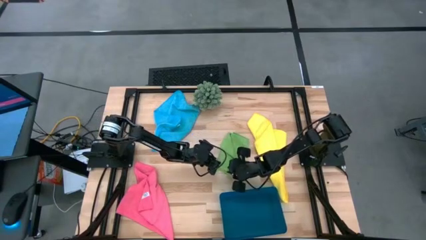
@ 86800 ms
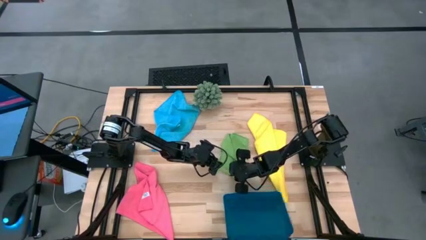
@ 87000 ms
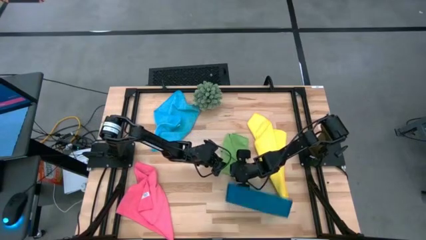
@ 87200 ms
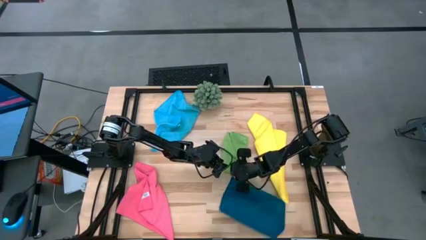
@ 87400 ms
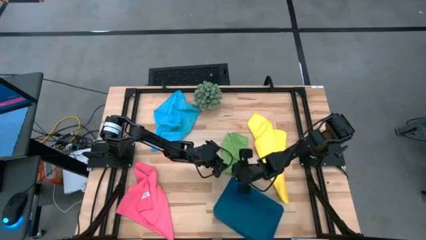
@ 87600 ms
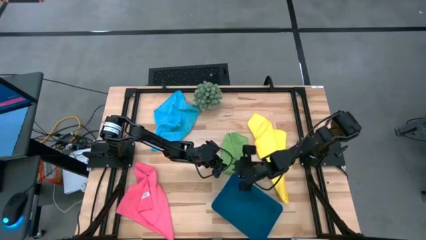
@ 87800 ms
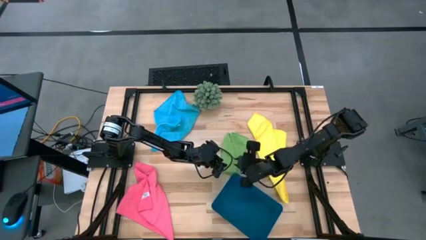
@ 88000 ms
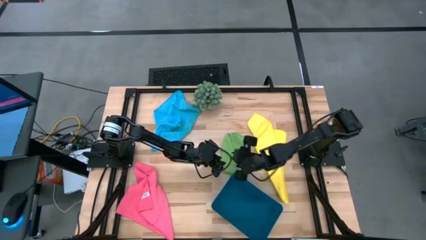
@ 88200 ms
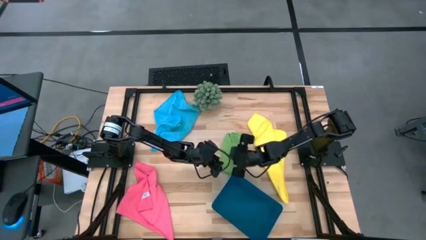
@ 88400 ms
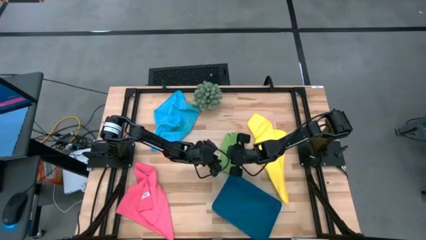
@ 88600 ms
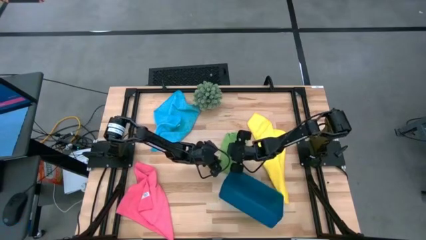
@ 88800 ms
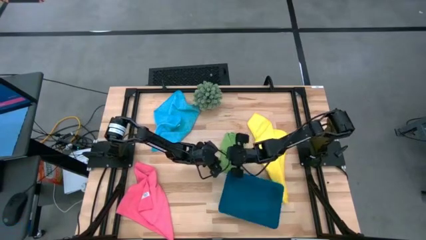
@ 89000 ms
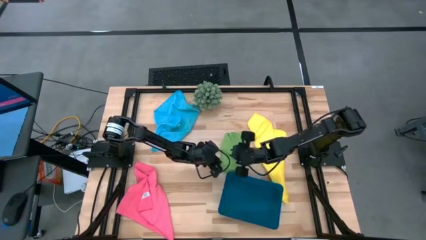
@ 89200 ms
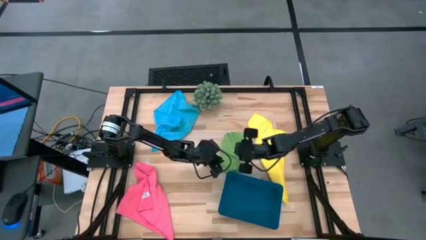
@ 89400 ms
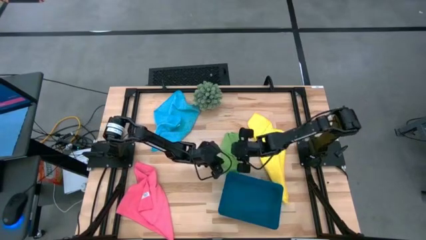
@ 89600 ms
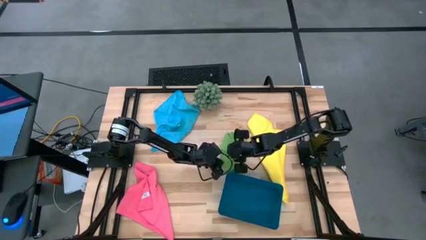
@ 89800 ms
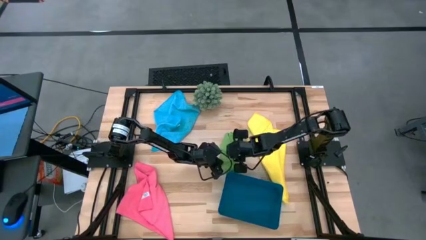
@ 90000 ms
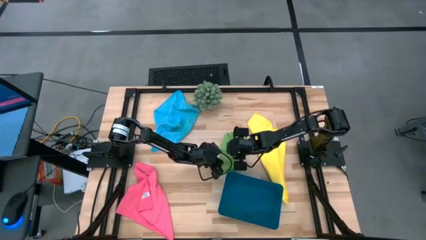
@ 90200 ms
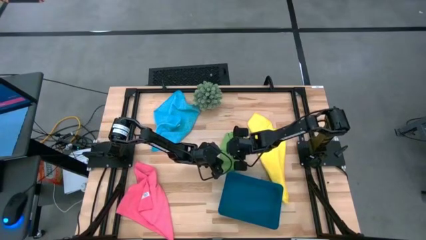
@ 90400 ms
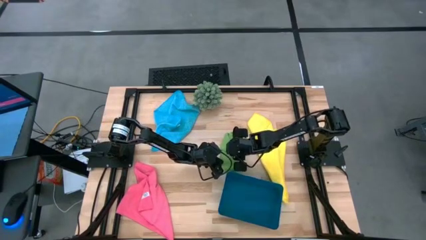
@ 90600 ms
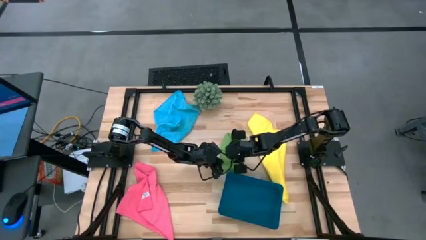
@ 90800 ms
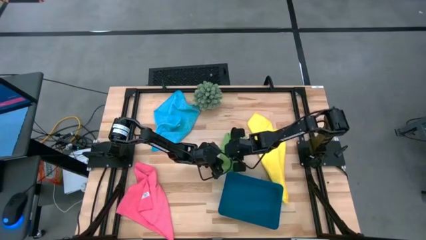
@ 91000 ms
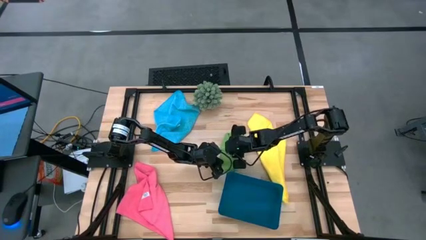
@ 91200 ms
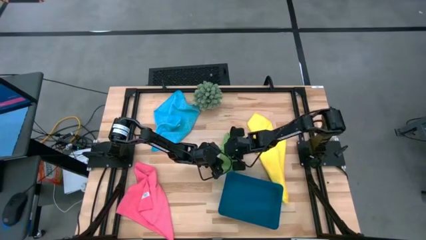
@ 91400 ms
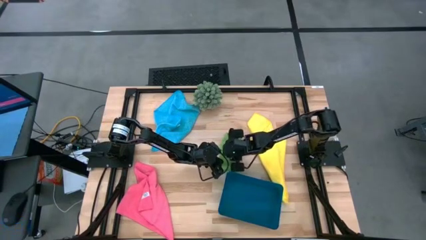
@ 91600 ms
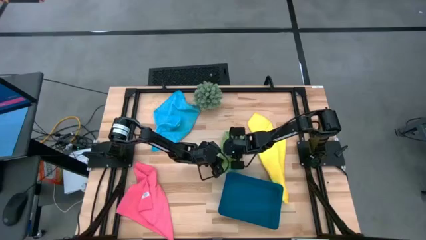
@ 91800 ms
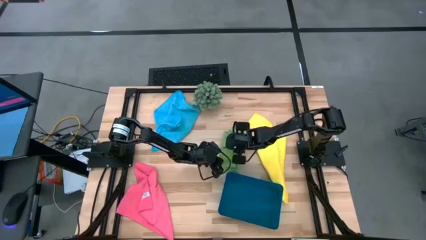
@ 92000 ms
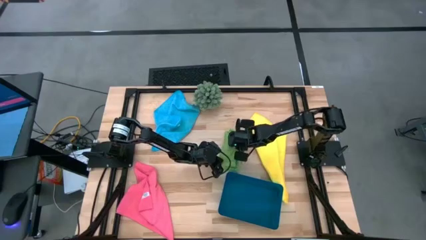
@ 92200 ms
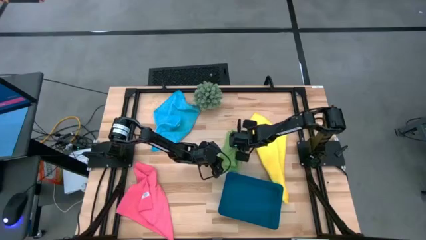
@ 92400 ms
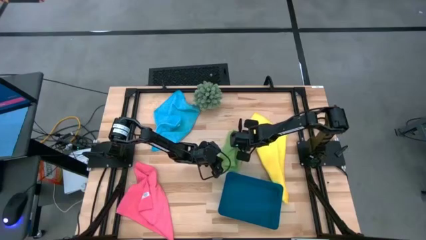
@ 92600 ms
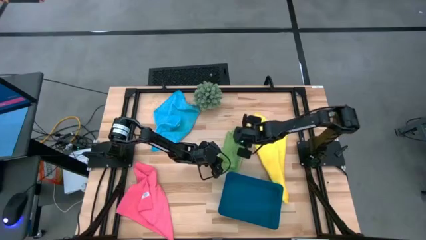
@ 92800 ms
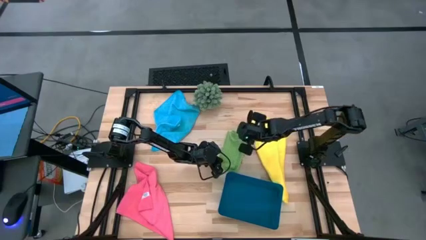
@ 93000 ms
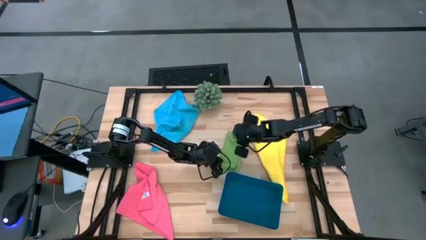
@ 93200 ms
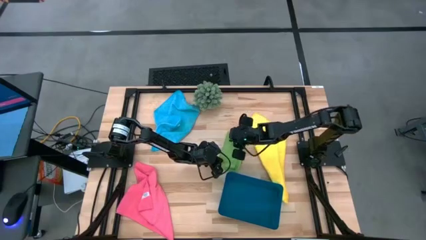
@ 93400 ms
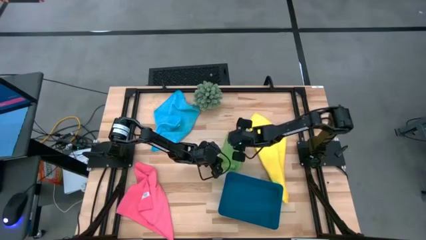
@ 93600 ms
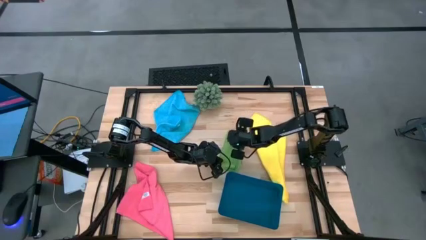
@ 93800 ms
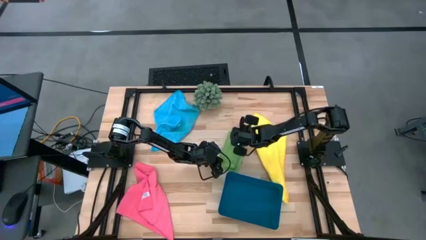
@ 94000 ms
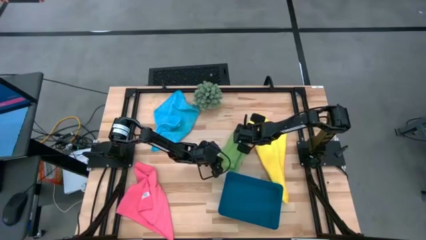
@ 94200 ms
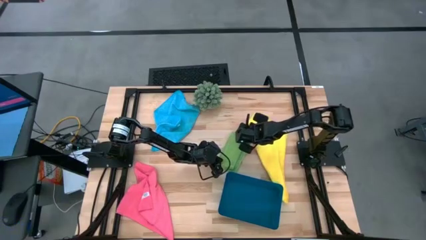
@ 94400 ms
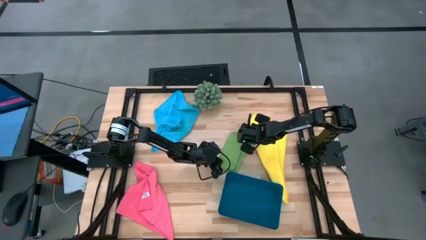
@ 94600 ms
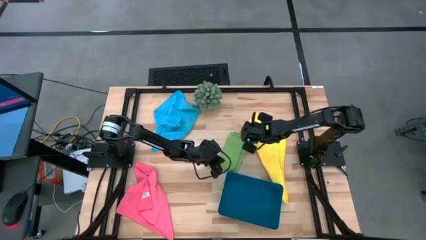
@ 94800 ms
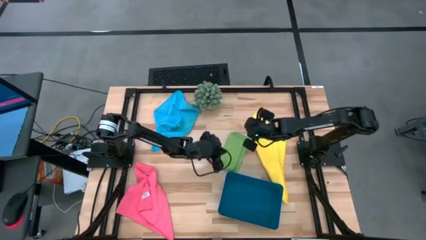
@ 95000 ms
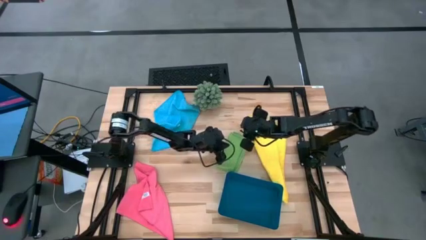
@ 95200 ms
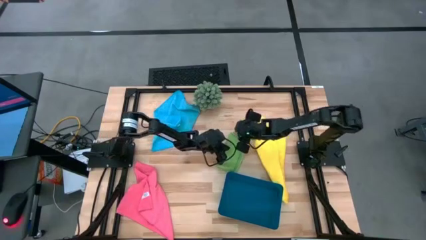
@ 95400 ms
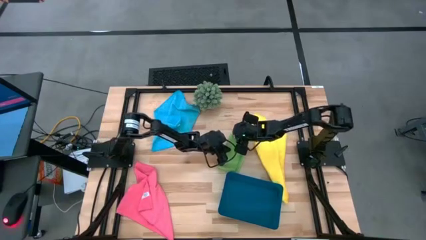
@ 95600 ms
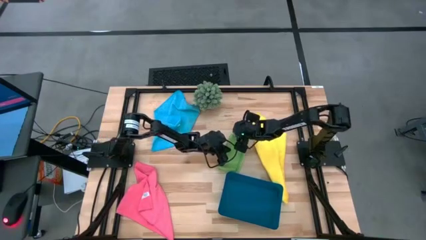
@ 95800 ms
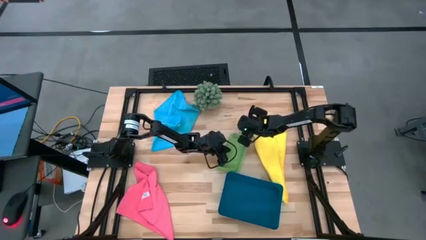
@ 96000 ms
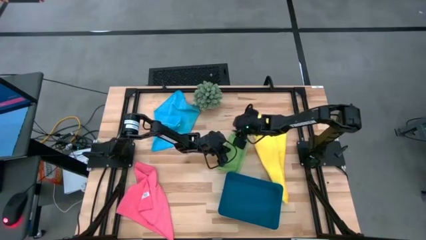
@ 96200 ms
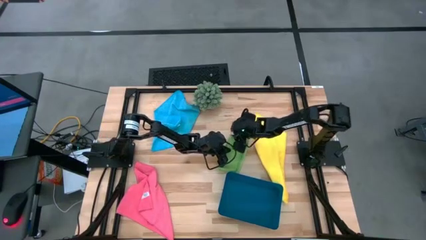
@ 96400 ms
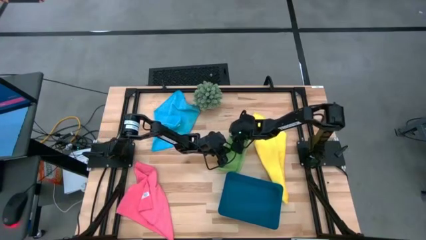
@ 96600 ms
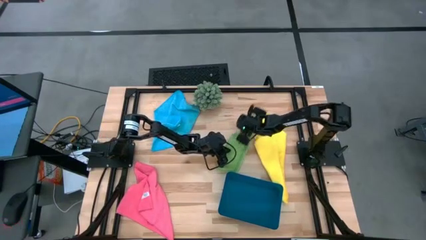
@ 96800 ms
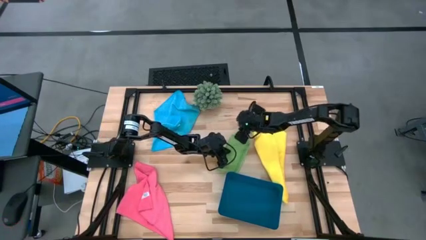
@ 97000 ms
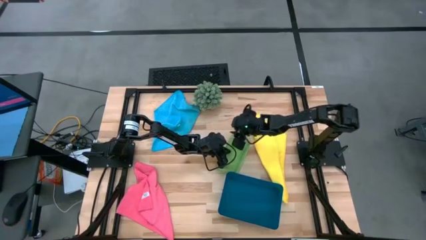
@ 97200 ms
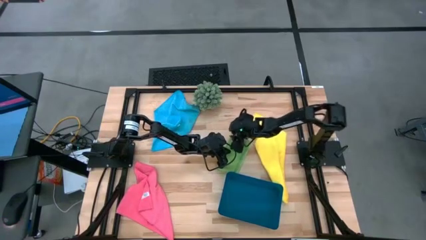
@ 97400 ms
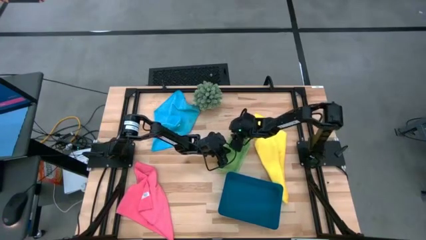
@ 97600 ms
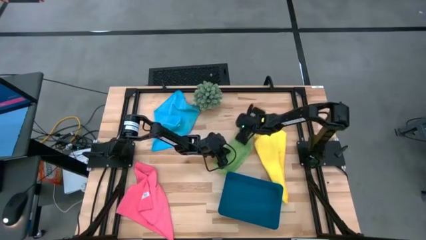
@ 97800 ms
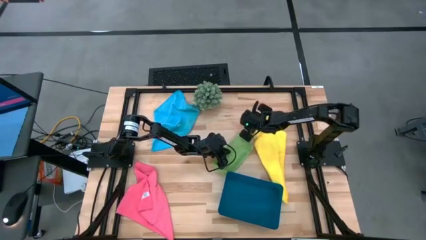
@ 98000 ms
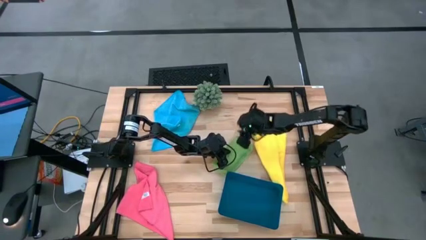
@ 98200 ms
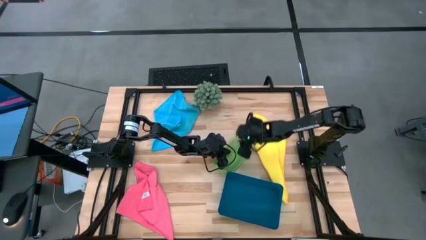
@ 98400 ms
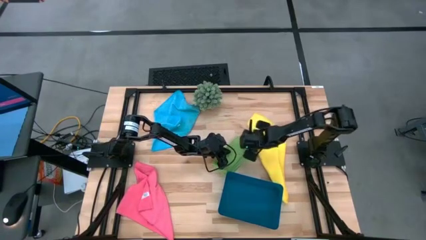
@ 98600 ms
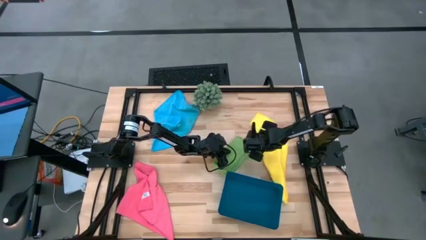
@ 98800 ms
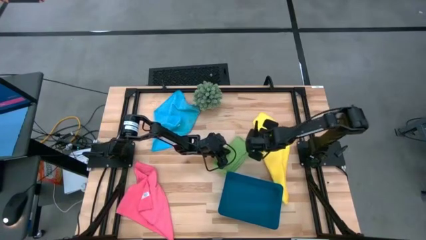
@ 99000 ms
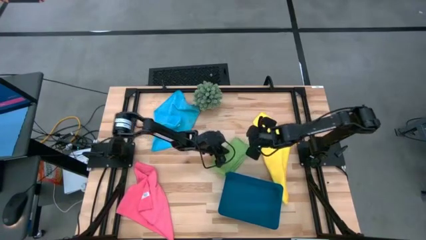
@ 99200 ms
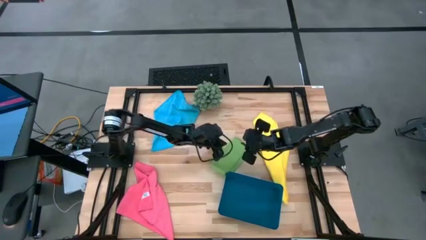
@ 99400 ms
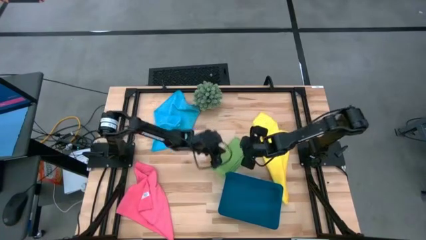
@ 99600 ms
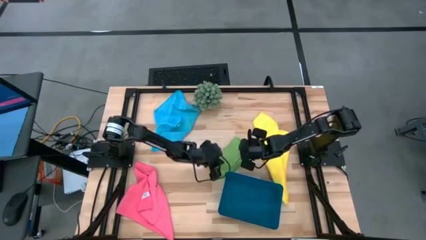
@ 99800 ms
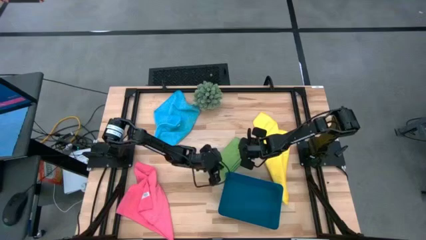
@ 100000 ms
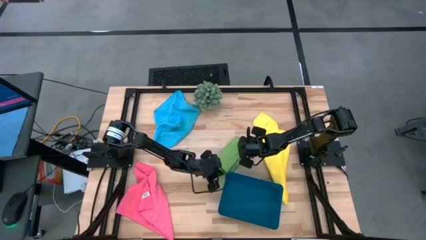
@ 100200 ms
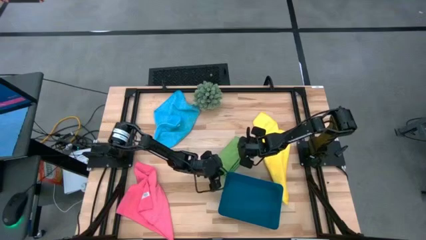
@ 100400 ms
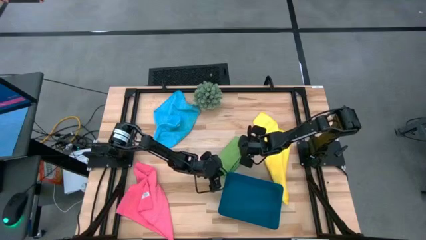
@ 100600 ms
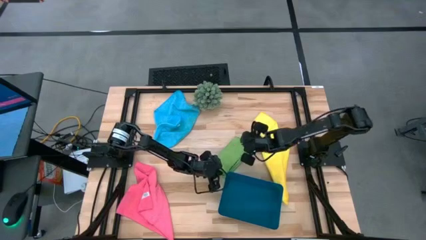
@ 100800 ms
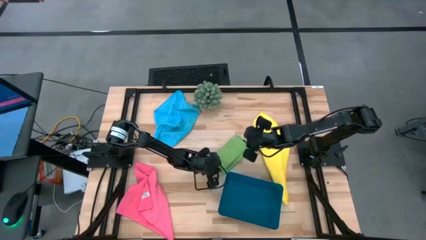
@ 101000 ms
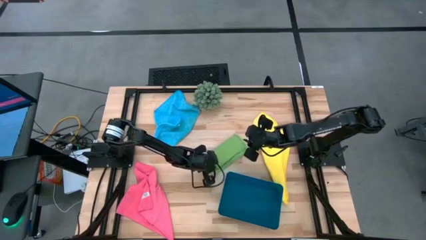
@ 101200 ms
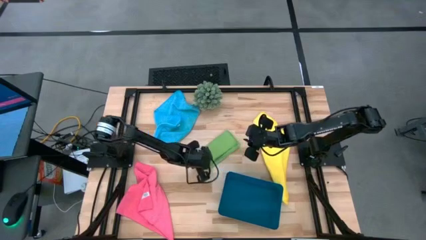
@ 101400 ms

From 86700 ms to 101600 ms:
Task: Fold microfiber towels
Fold the green microfiber cloth

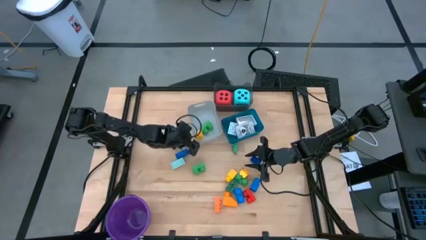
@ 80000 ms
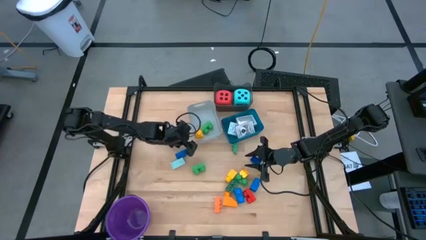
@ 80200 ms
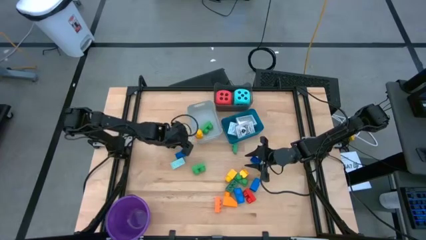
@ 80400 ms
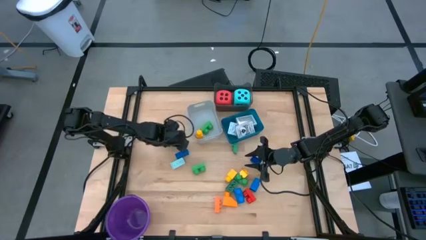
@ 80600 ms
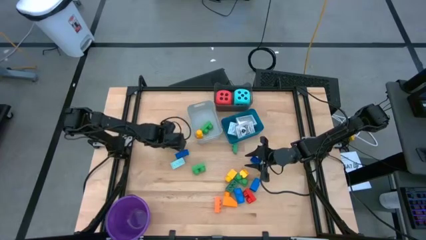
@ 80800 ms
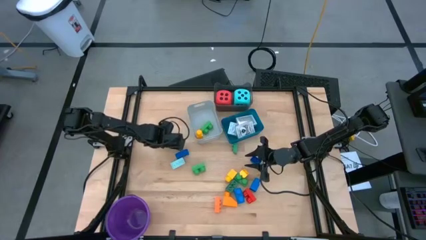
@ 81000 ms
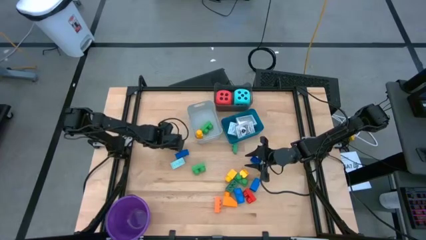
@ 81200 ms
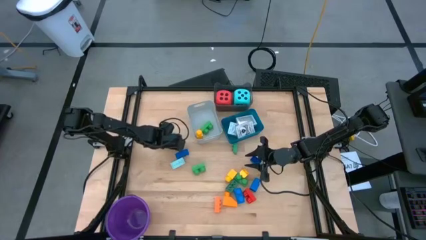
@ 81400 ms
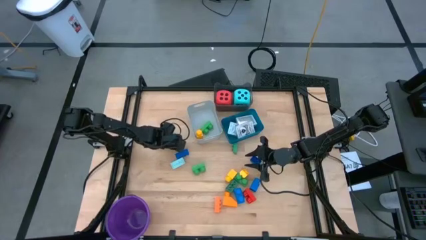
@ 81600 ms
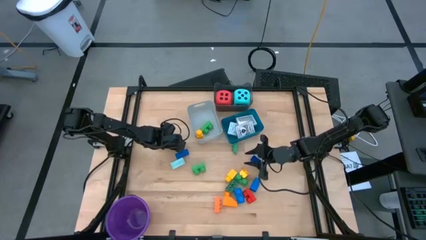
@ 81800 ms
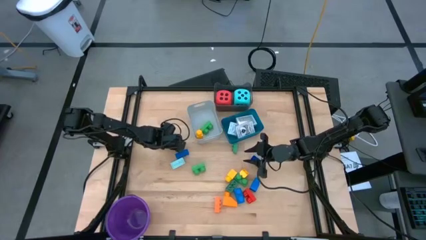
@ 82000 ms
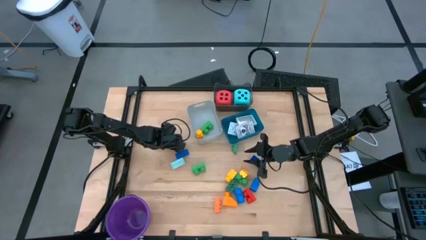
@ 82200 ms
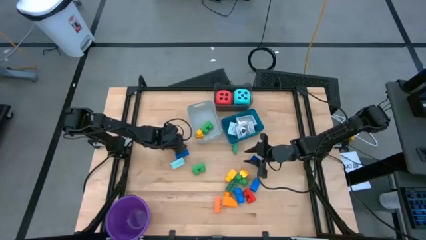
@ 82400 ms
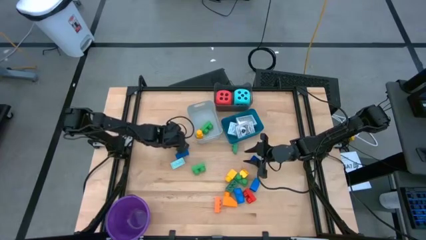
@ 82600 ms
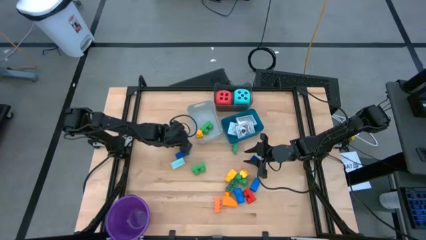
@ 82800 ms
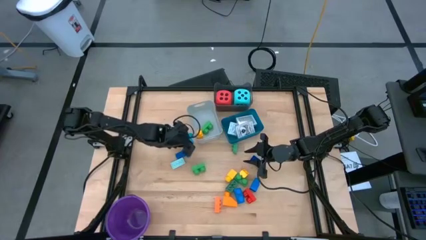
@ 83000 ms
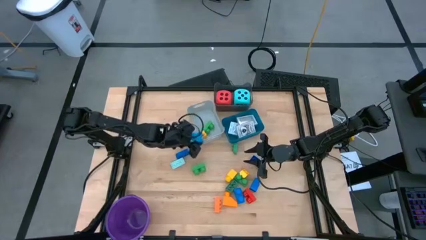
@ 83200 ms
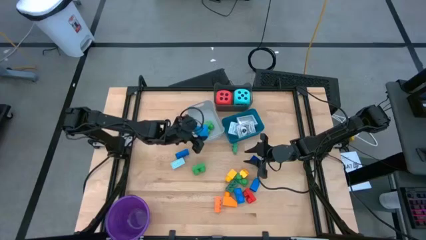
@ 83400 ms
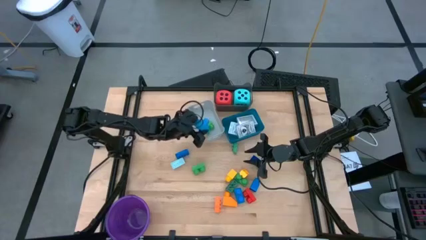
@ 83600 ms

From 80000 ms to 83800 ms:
Task: Pick & Place Toys
Put the blue game piece into the gray bin
